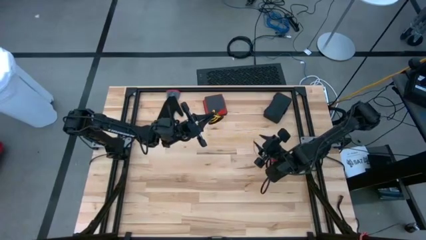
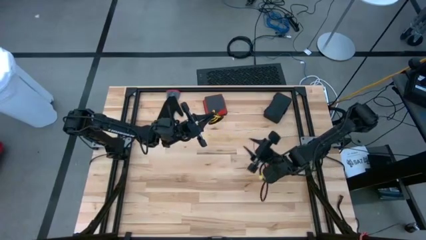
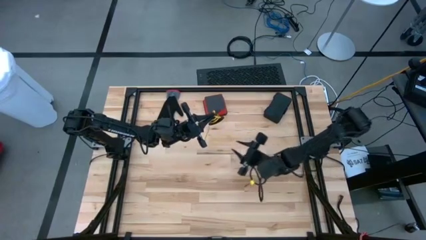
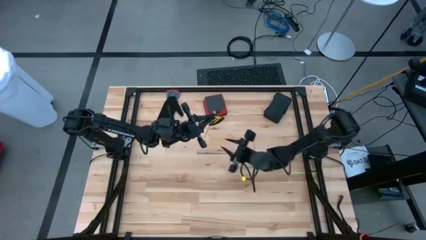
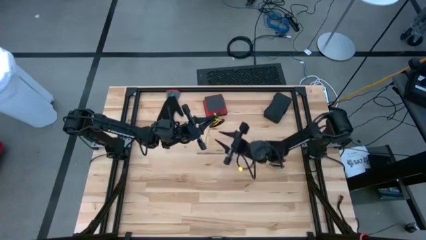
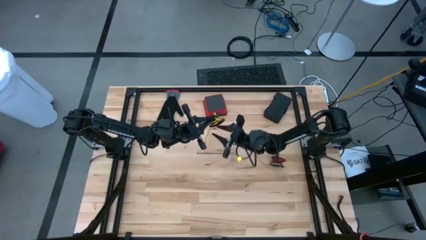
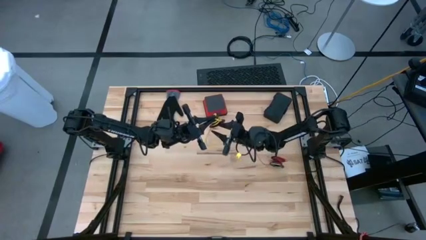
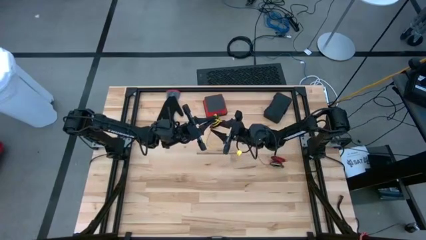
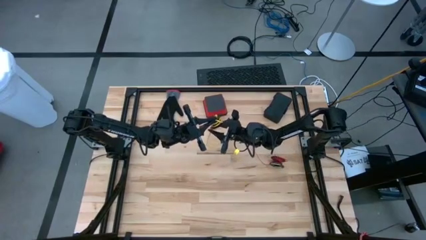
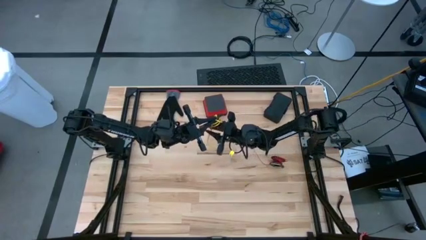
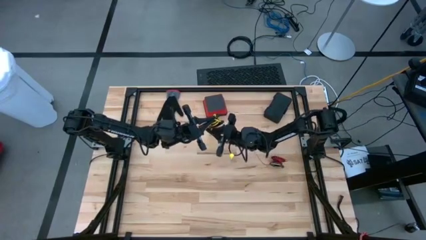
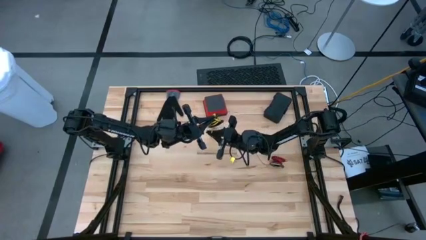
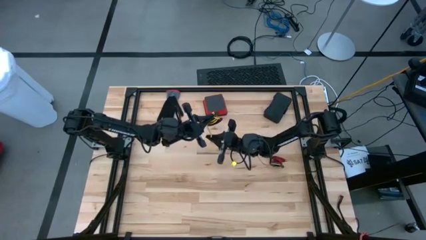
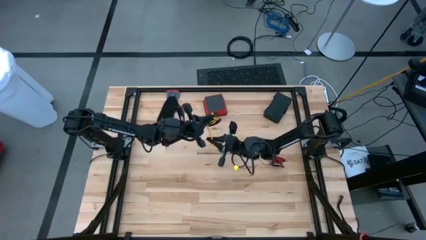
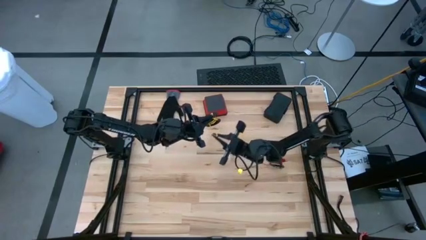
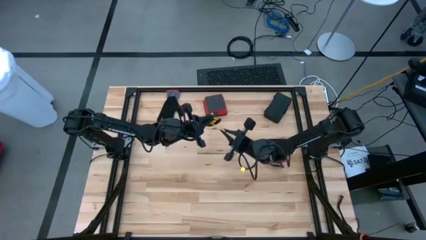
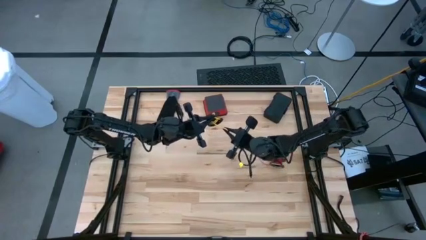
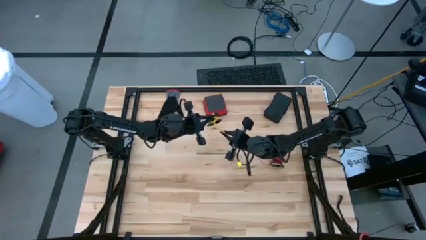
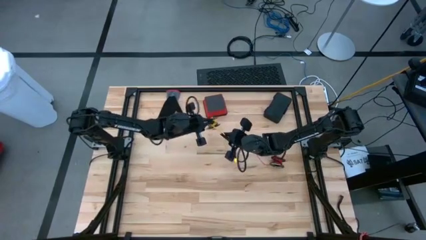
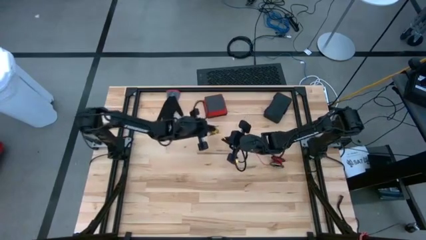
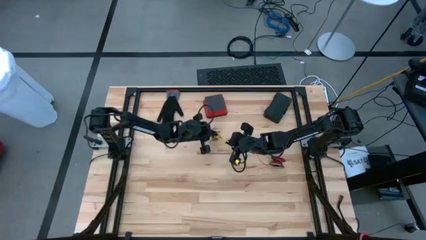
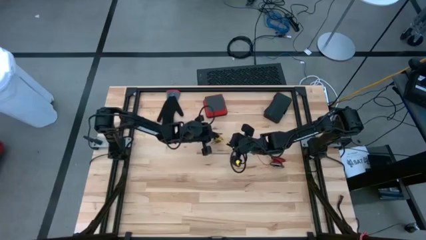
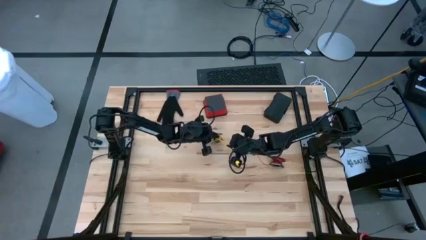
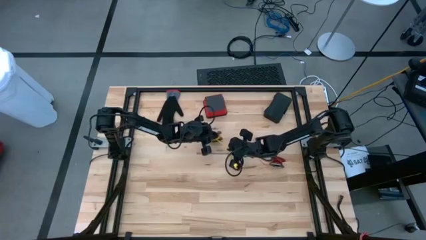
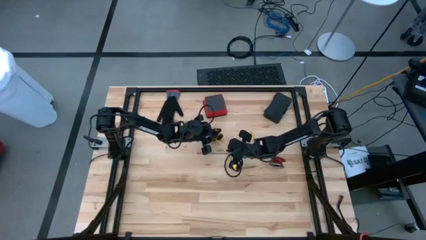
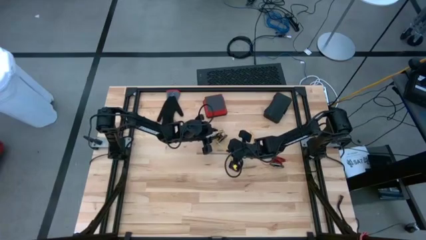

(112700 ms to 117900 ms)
Task: Coil cords
Uncoil the yellow wire from the spool

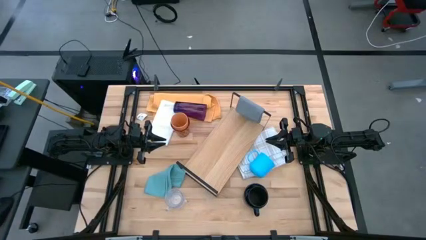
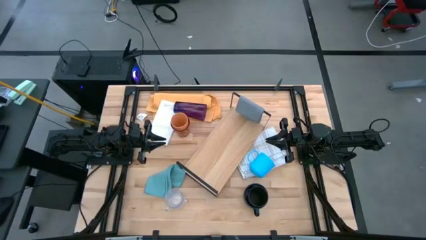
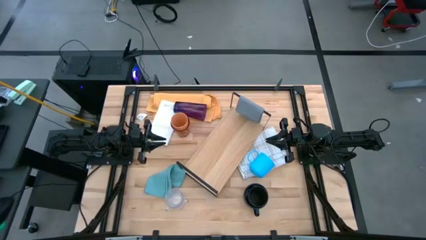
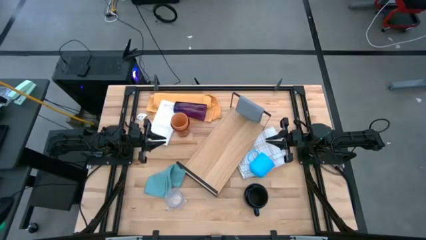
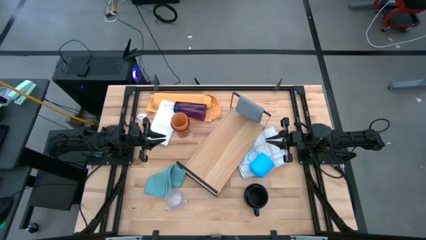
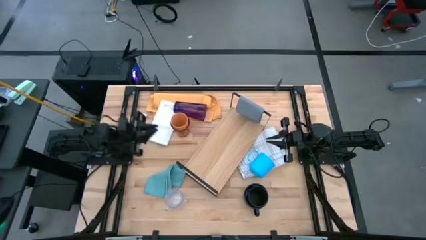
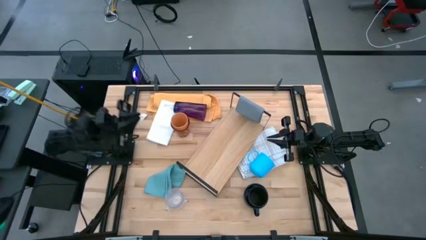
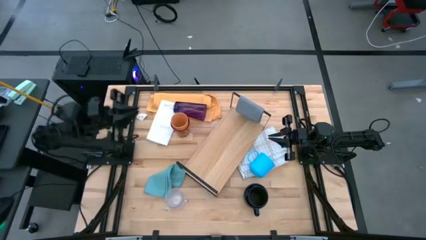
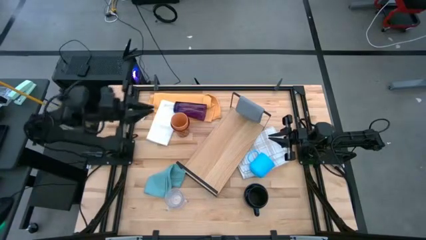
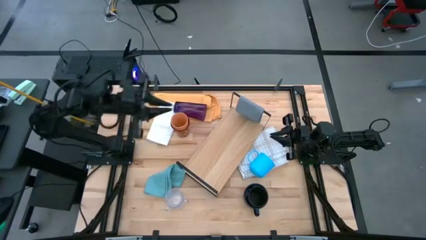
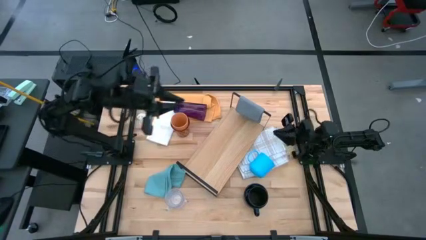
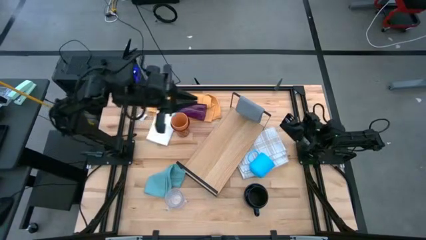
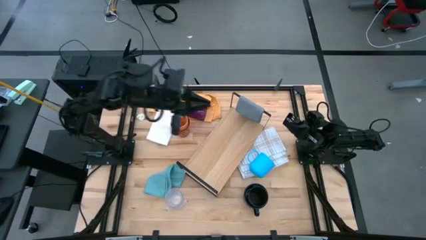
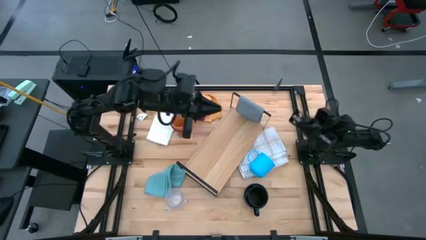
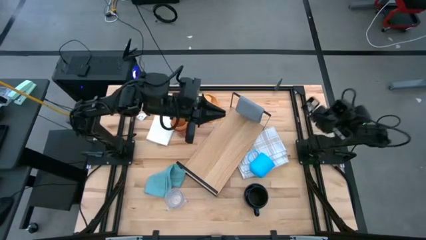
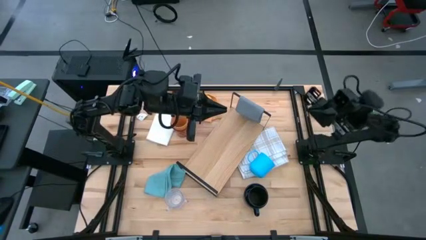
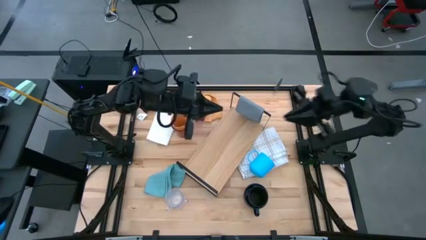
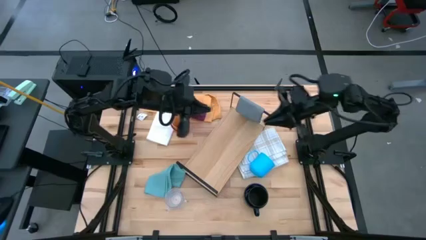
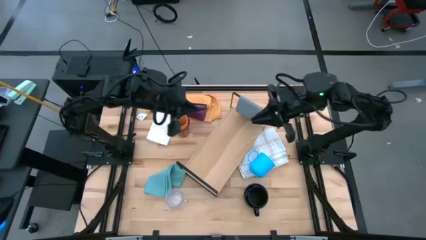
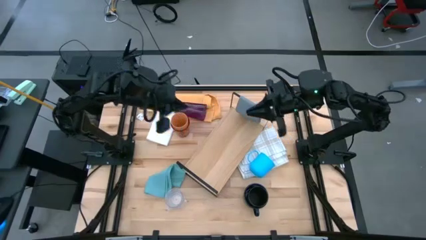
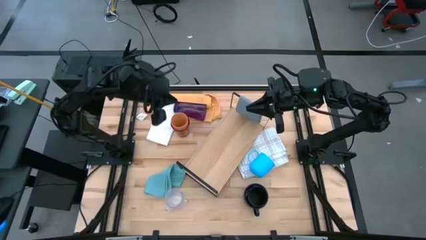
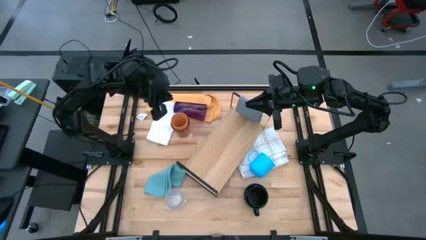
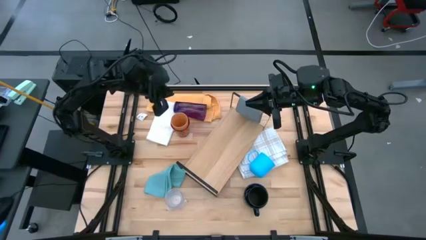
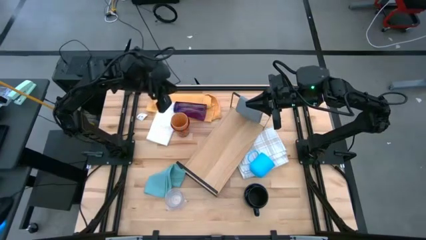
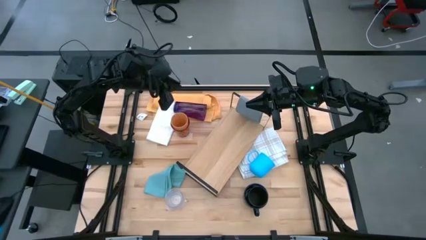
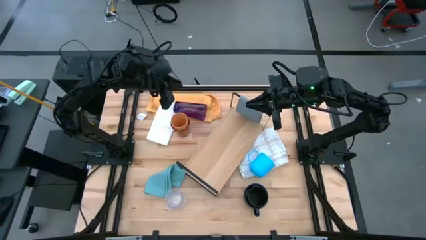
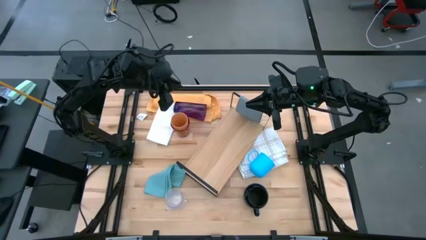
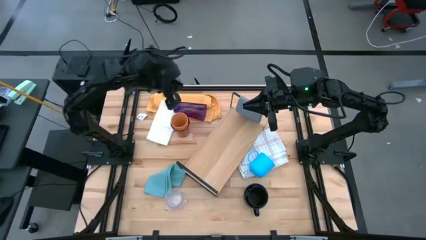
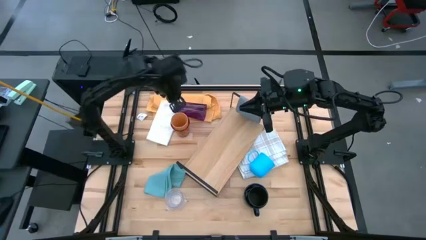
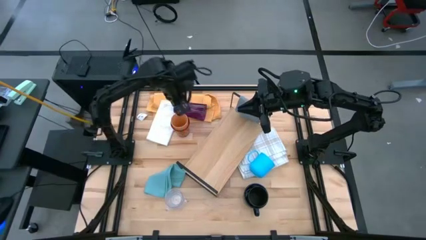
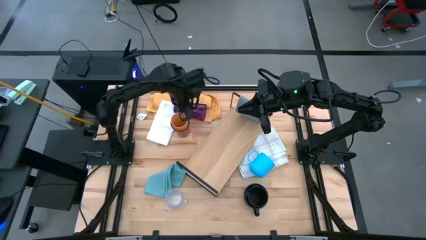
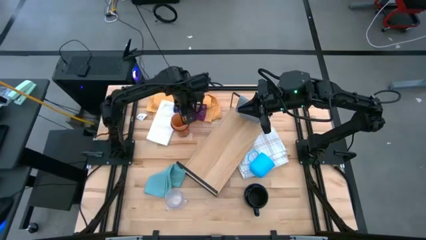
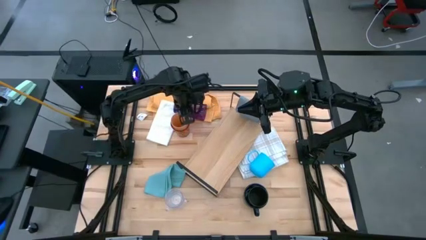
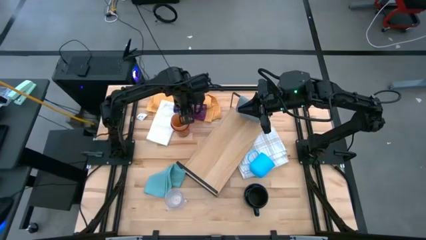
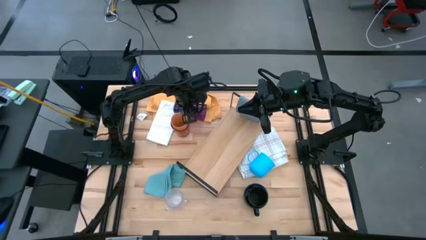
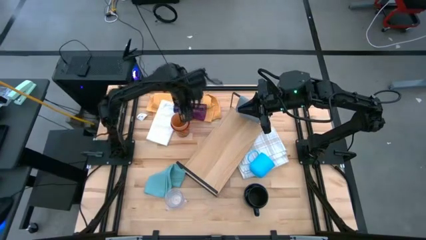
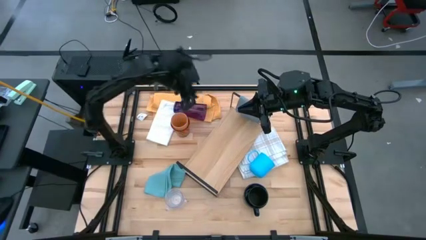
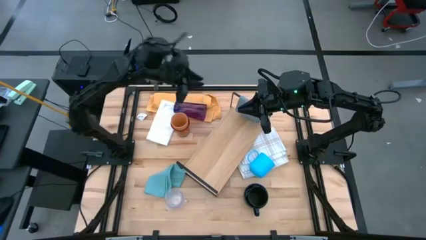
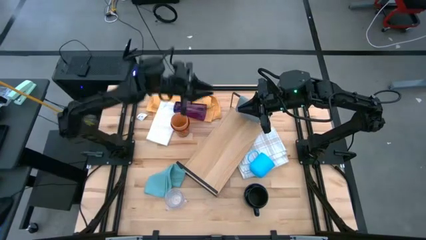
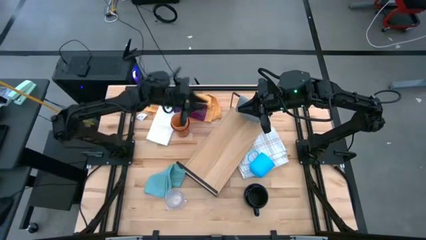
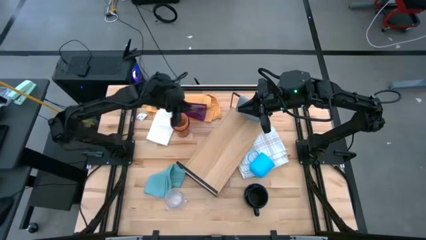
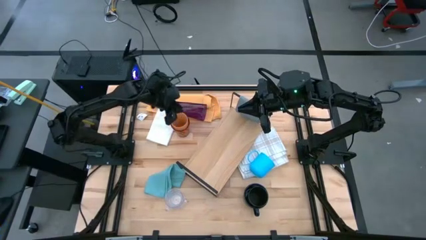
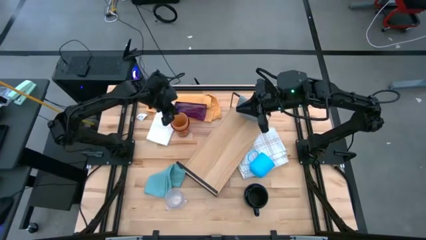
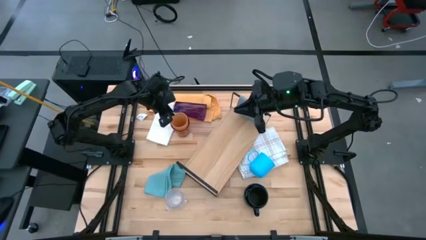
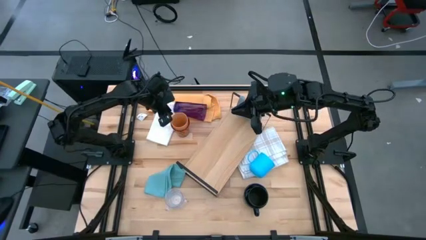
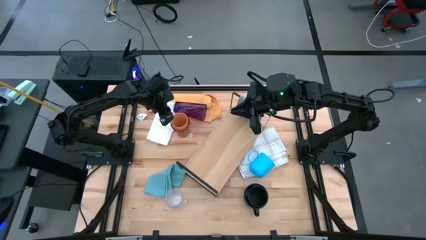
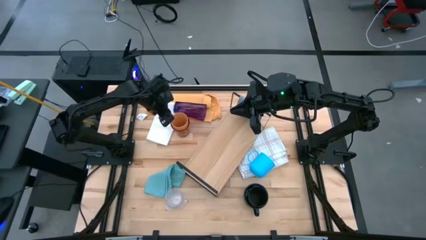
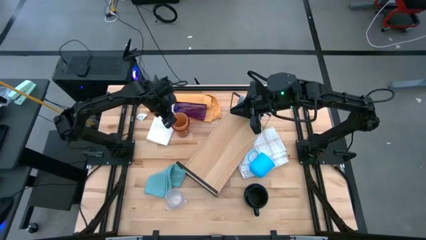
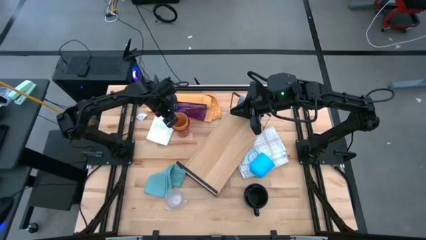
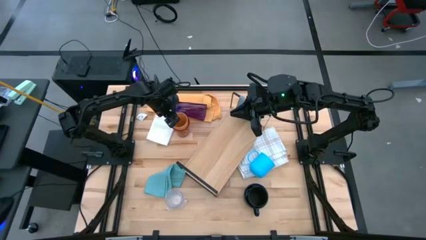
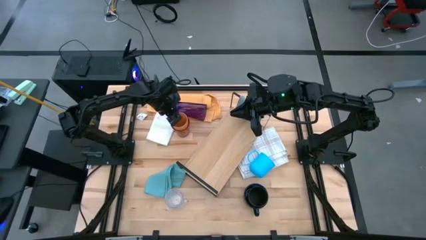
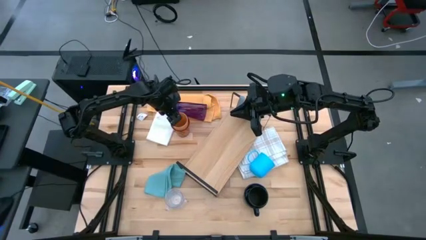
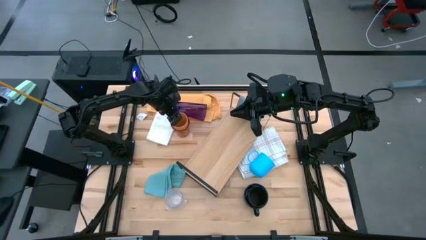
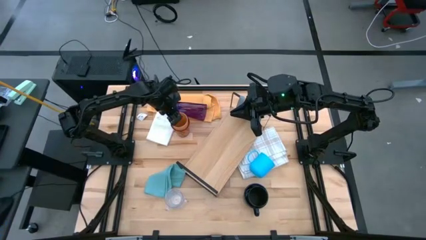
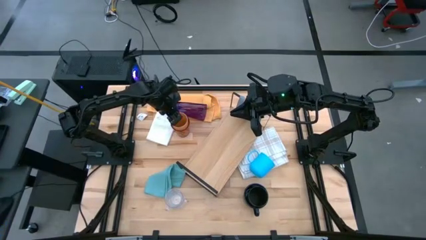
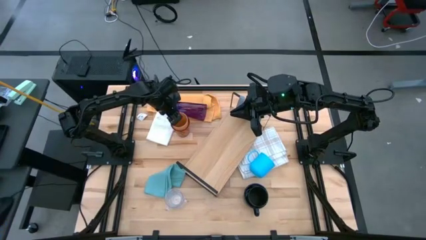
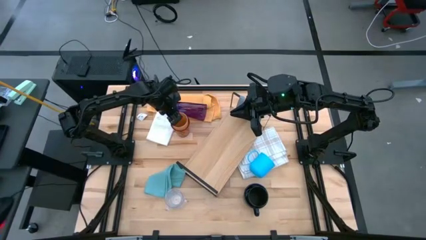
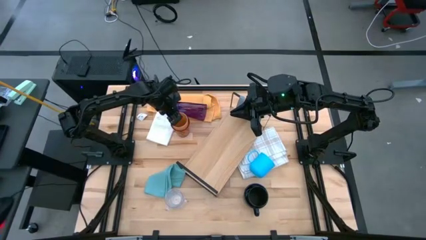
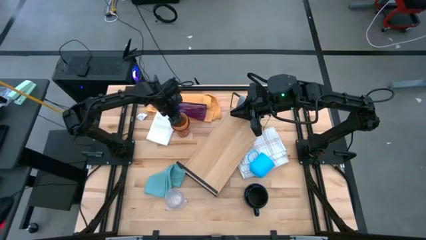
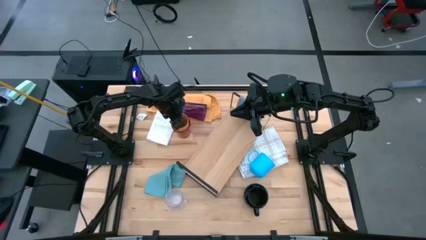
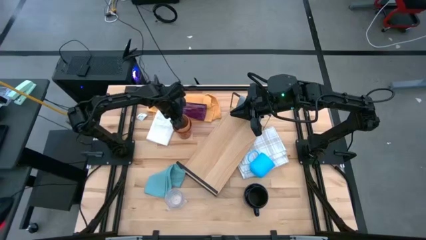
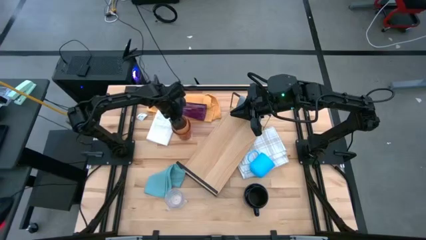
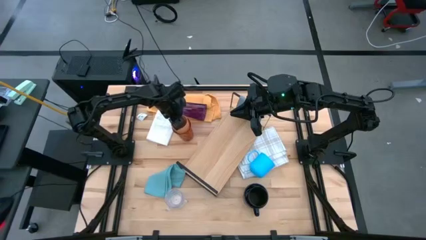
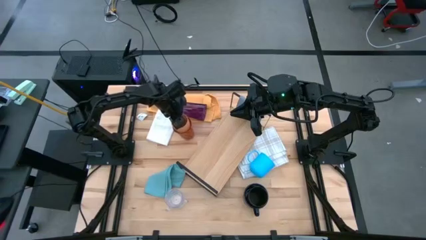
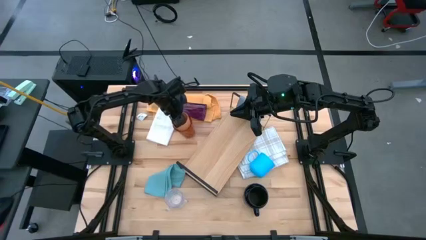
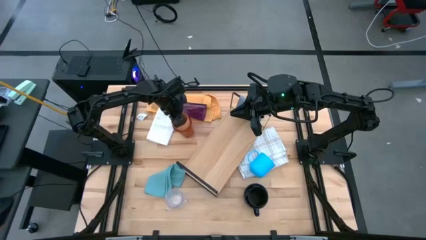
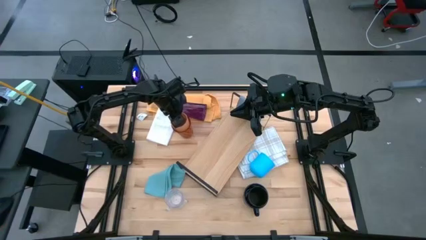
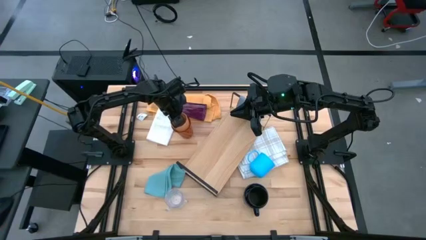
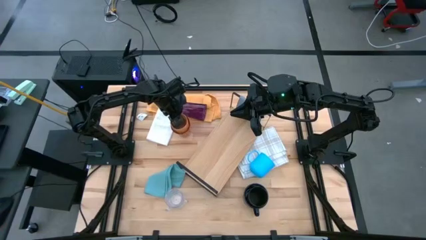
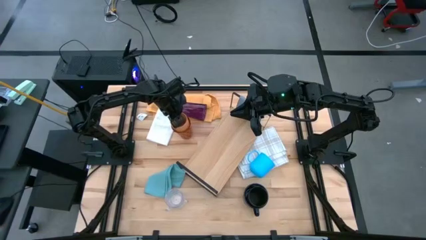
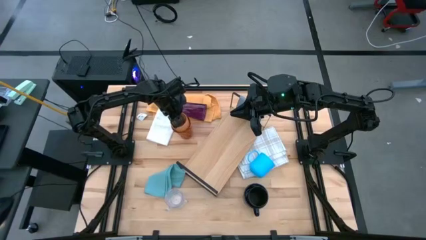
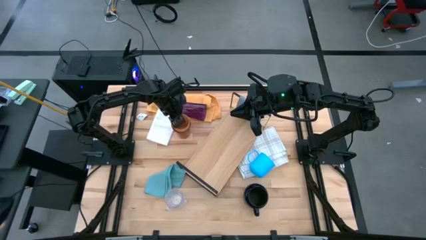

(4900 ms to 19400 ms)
Task: Stack small to large cups/mugs on shelf
Put the orange cup on the shelf
